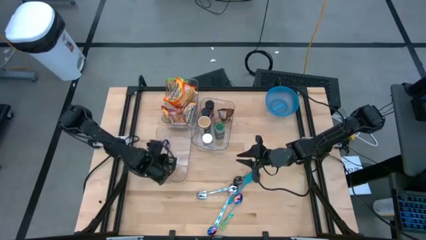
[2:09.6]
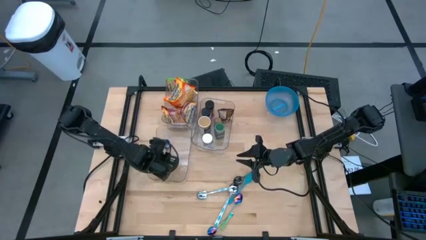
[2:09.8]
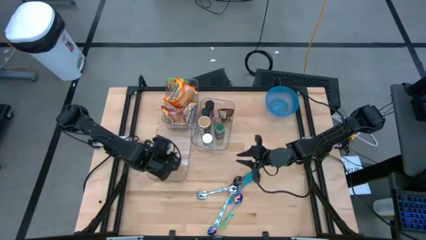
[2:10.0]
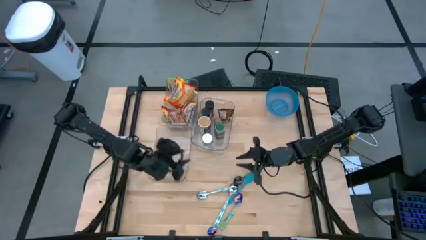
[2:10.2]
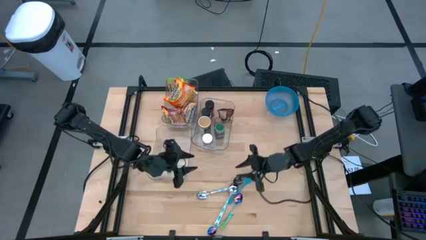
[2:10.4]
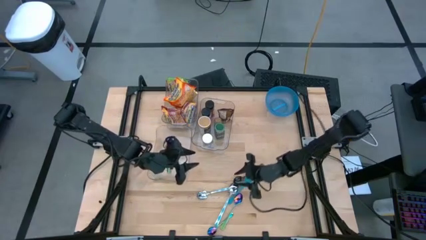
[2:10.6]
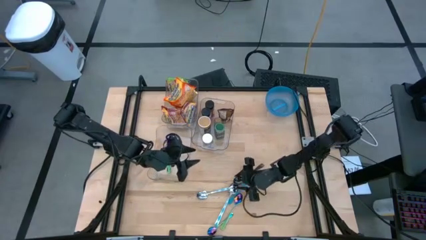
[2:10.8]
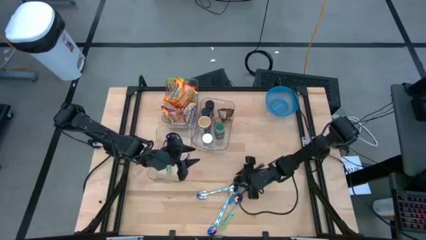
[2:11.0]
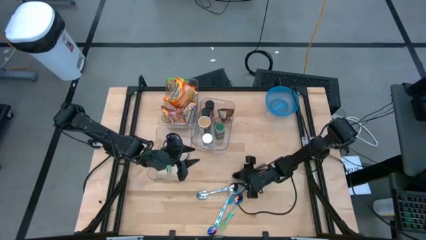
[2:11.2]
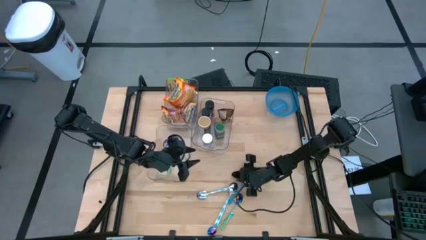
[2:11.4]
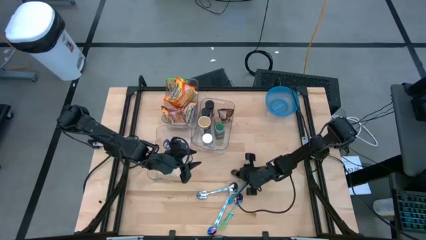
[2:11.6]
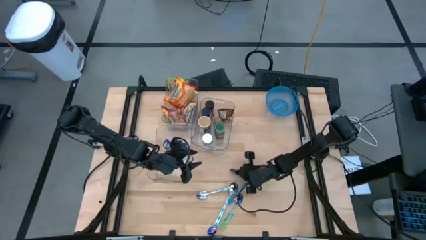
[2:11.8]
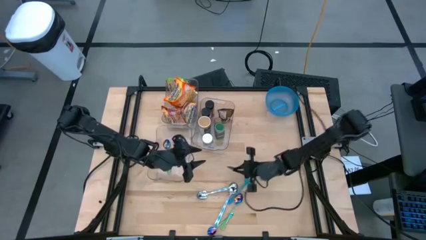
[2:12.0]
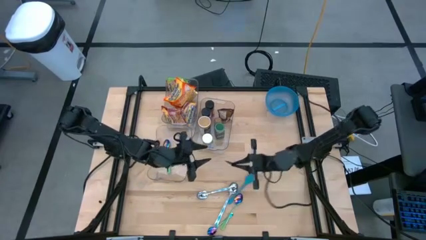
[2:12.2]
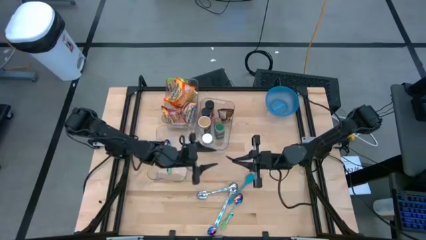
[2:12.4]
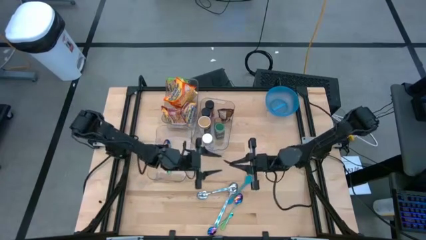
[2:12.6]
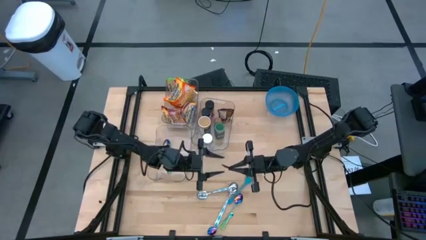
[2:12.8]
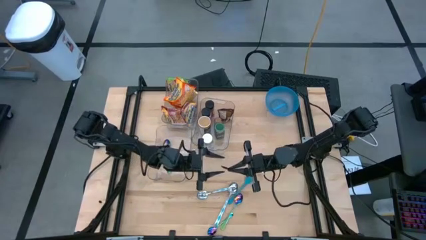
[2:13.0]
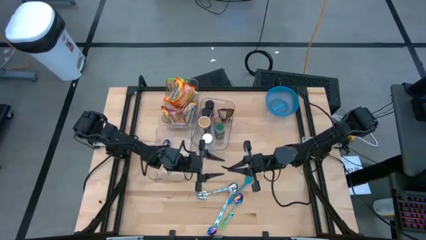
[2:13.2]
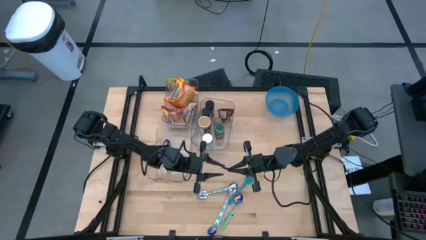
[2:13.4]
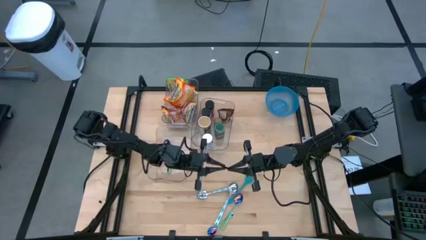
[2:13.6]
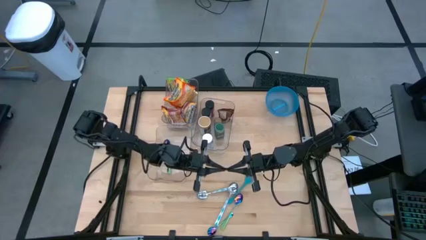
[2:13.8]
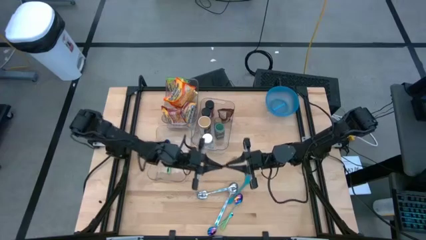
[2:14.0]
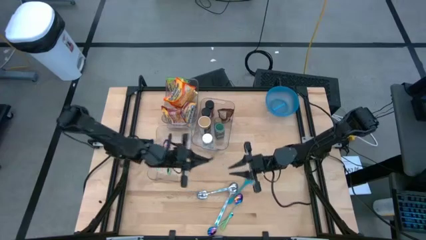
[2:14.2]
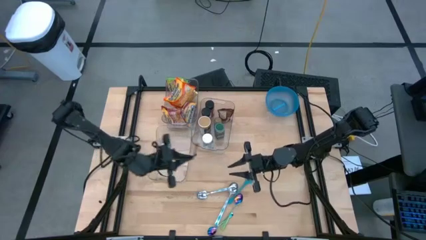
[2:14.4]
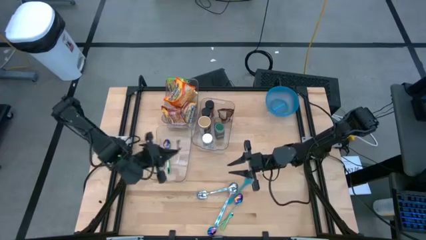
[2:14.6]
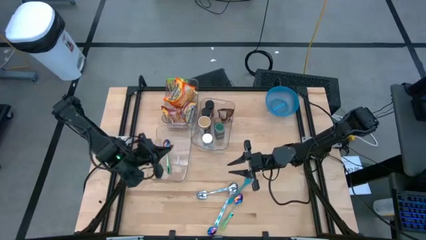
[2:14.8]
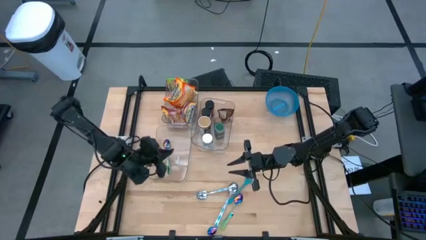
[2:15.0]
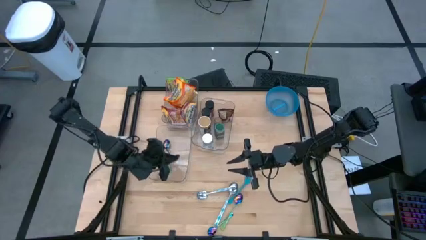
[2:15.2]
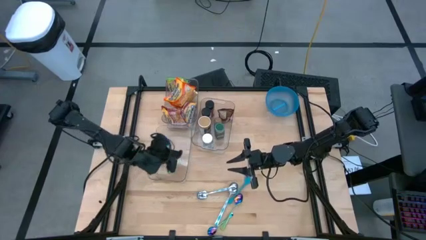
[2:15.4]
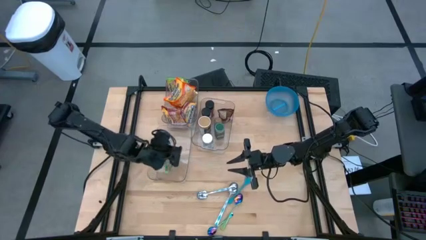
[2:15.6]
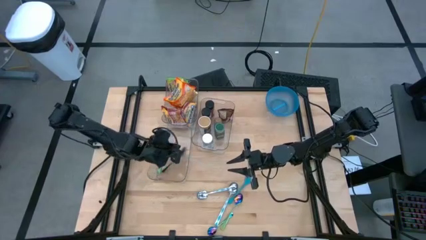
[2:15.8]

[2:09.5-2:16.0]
Task: Pick & Place Food Item
Put the black spoon into the bottom transparent bin

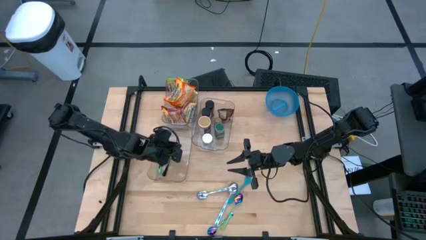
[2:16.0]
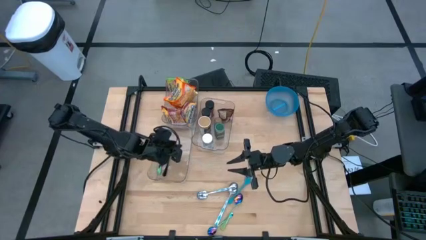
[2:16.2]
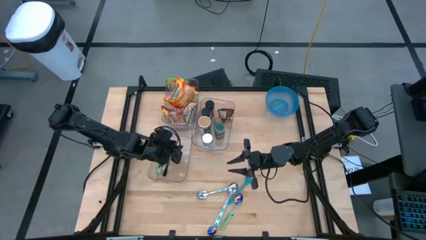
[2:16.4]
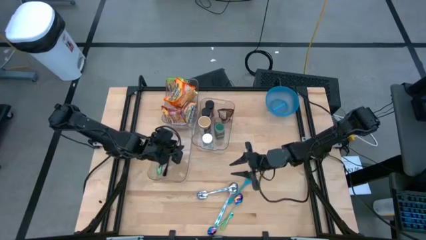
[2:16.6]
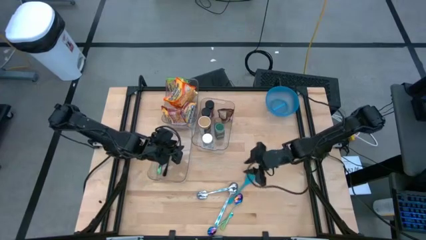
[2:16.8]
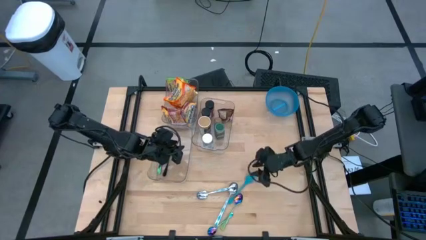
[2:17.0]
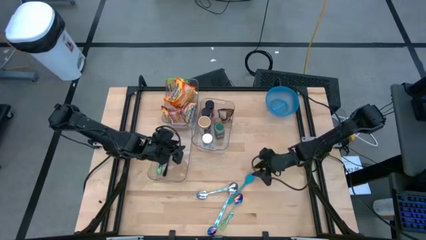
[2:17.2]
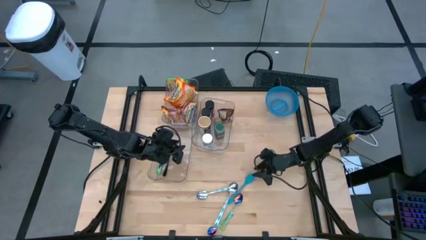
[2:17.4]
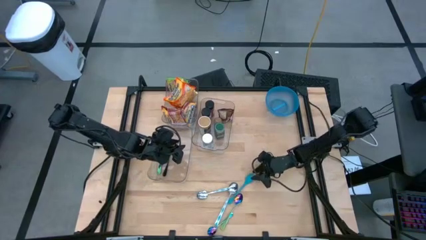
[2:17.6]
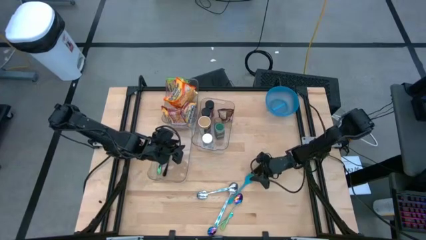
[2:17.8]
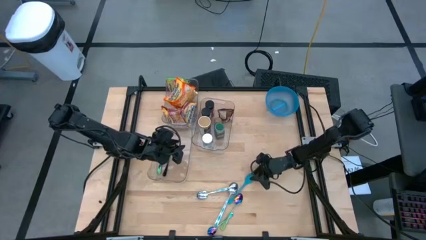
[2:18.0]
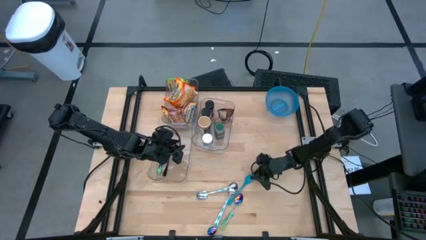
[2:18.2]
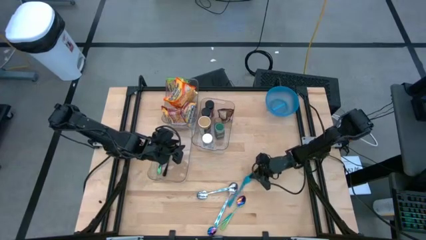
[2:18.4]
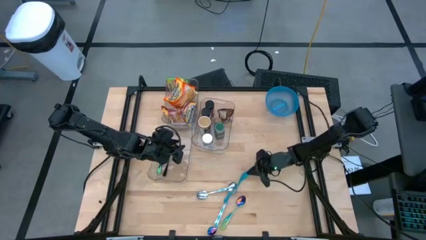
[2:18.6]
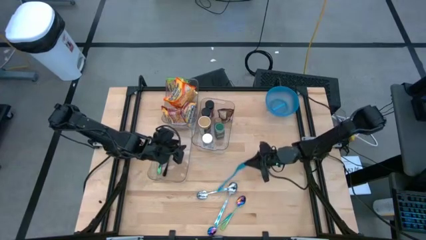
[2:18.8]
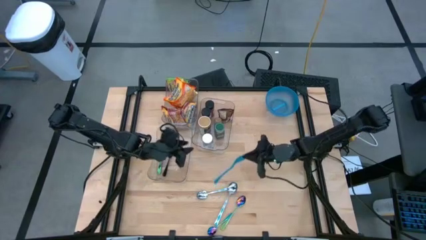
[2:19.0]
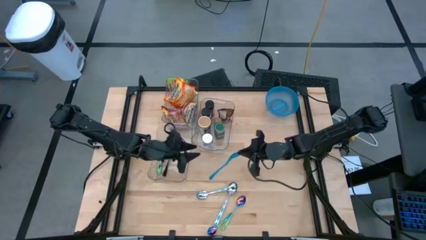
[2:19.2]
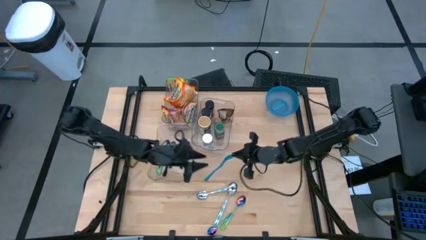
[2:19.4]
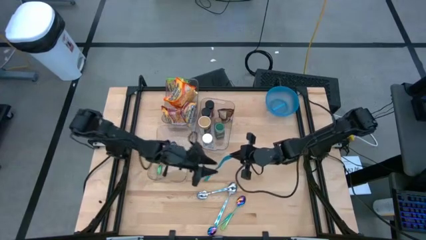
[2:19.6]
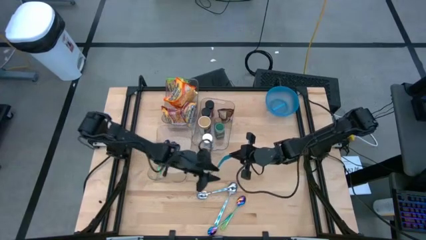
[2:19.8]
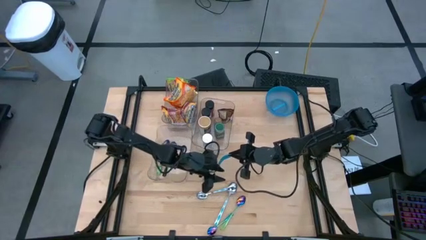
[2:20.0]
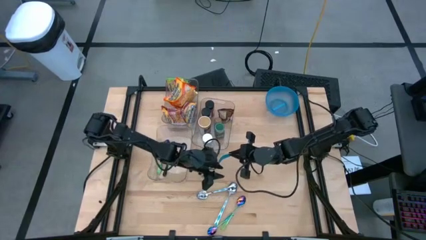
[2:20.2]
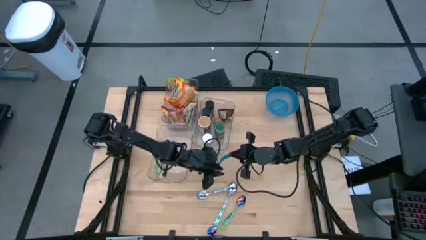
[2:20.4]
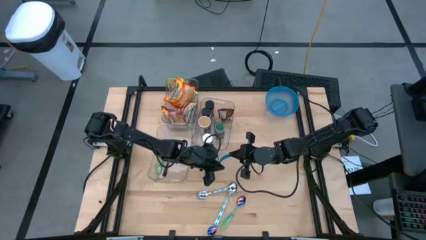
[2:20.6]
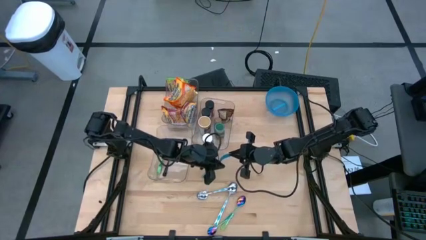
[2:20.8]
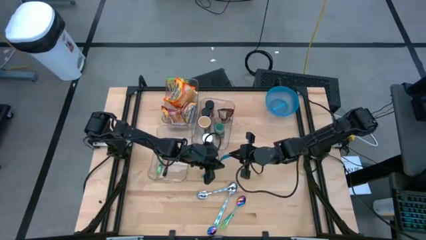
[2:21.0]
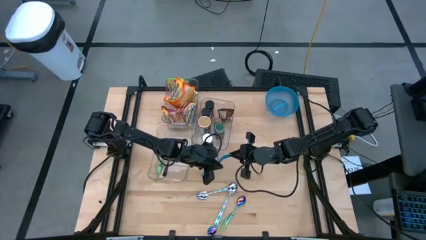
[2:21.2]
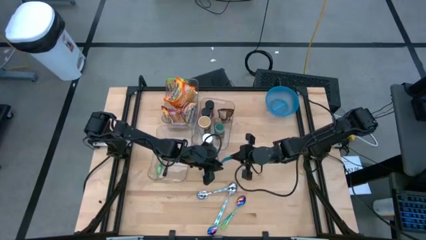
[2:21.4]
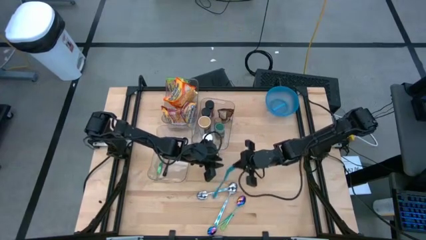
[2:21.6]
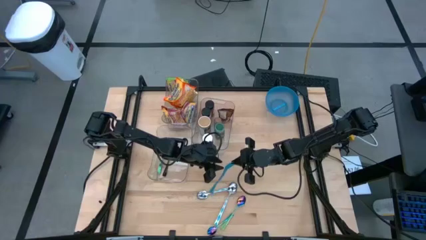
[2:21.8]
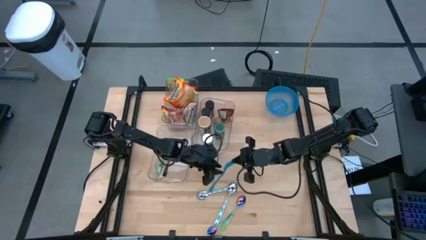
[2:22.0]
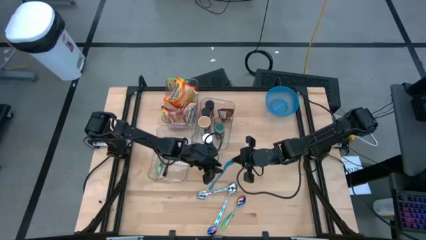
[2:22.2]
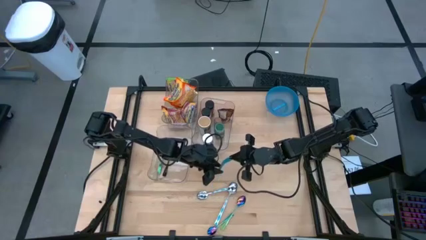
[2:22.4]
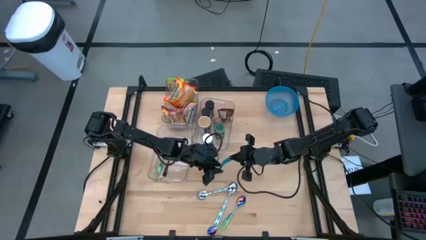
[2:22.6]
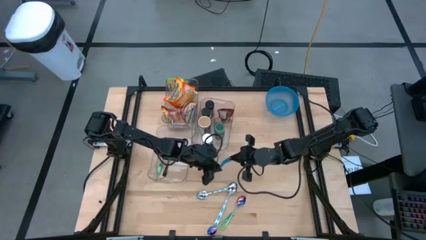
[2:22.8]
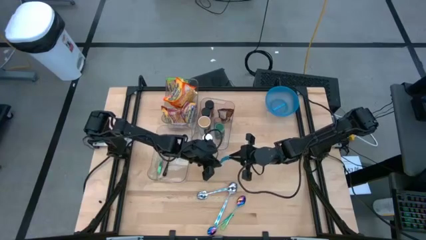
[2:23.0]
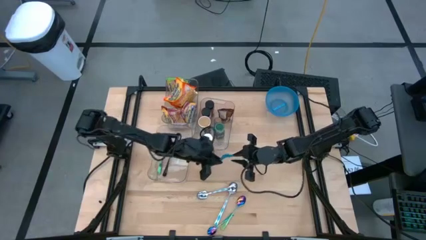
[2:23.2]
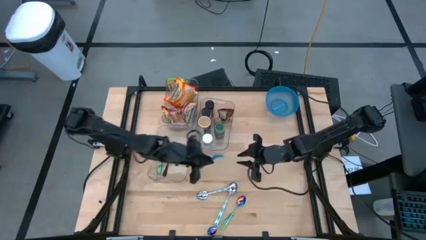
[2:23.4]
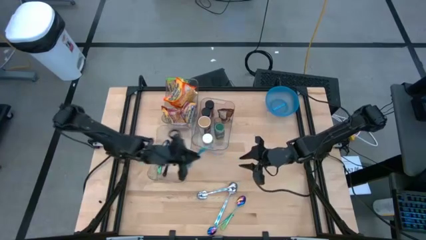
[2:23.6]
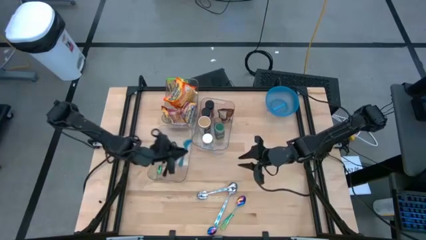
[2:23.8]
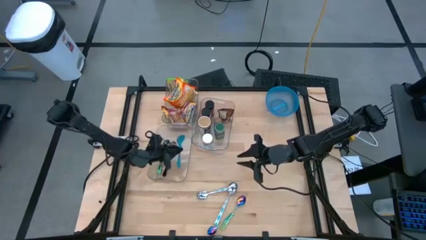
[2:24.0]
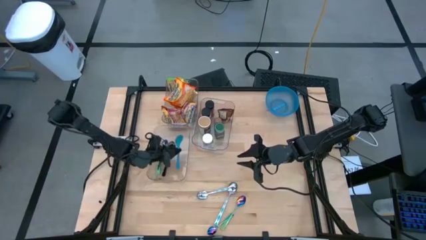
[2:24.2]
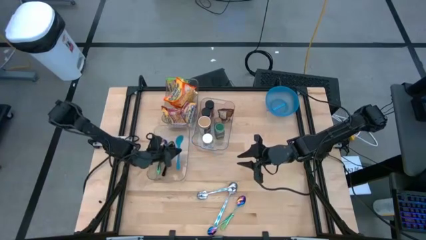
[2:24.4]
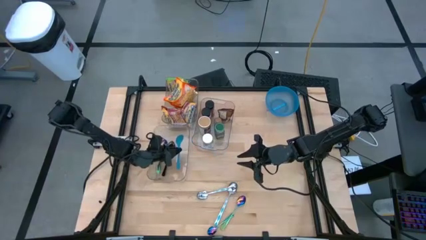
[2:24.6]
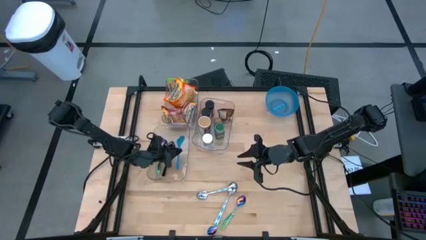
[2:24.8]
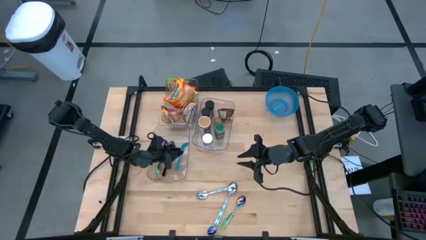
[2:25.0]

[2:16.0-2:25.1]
Put the blue spoon into the bottom transparent bin
